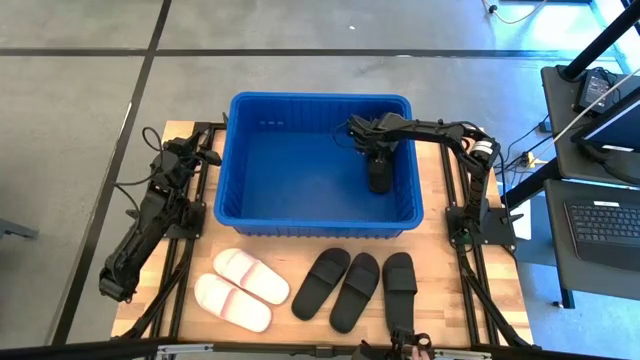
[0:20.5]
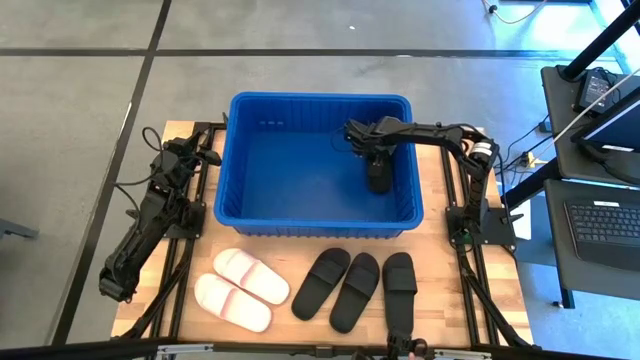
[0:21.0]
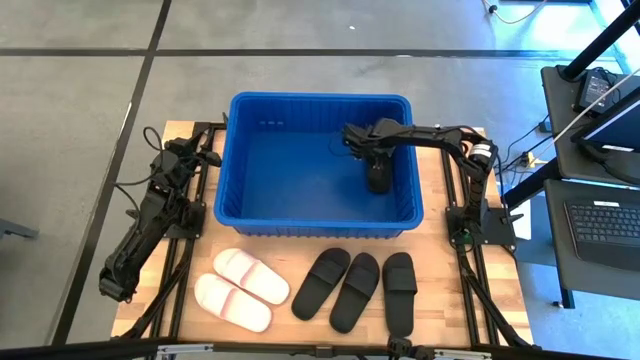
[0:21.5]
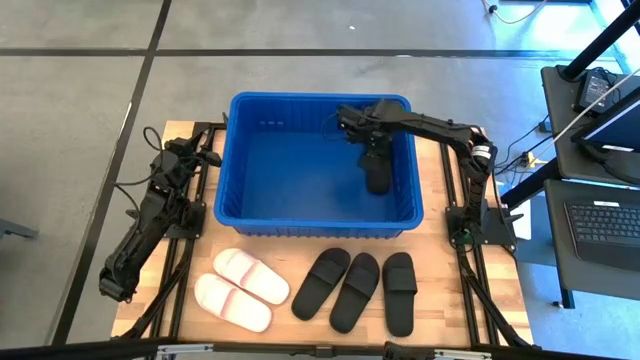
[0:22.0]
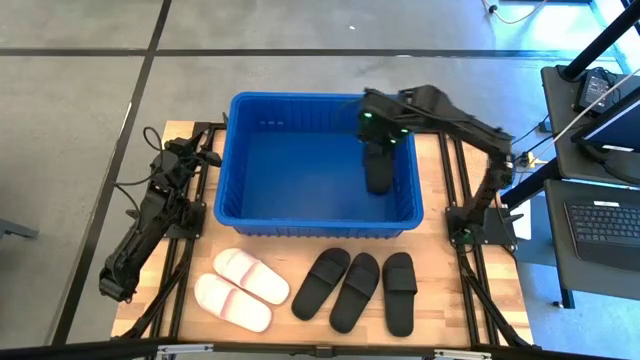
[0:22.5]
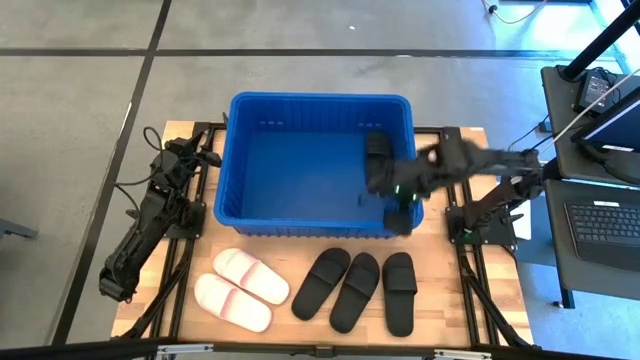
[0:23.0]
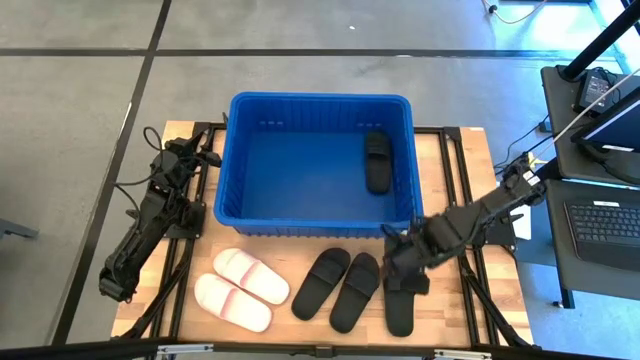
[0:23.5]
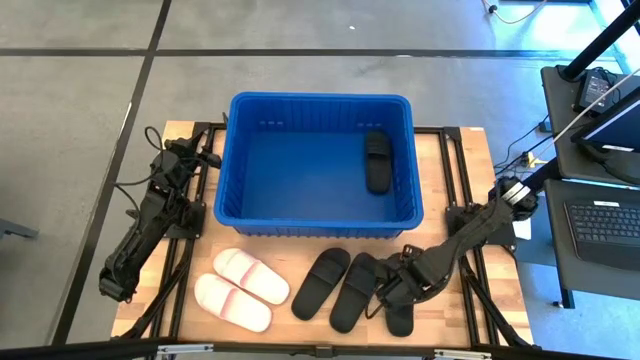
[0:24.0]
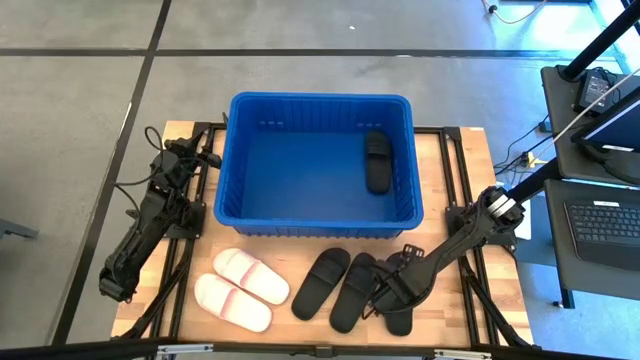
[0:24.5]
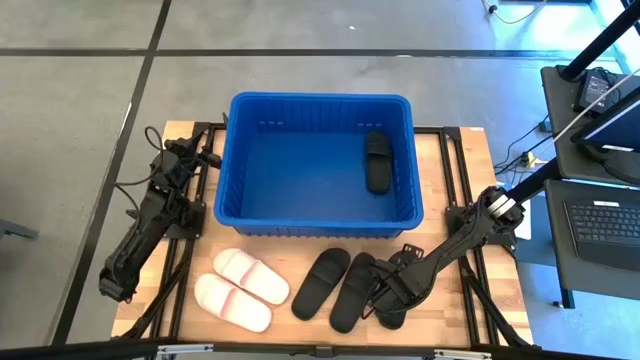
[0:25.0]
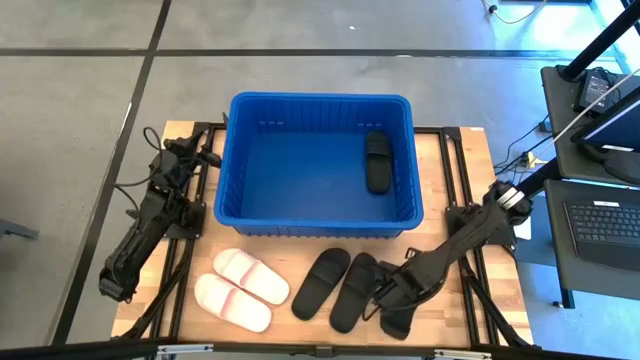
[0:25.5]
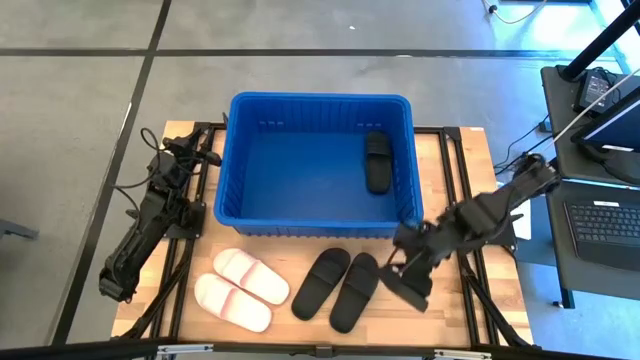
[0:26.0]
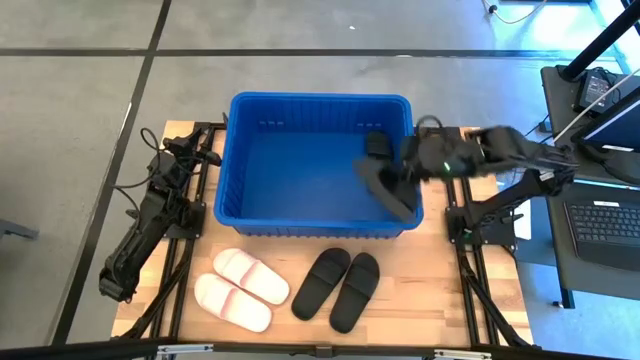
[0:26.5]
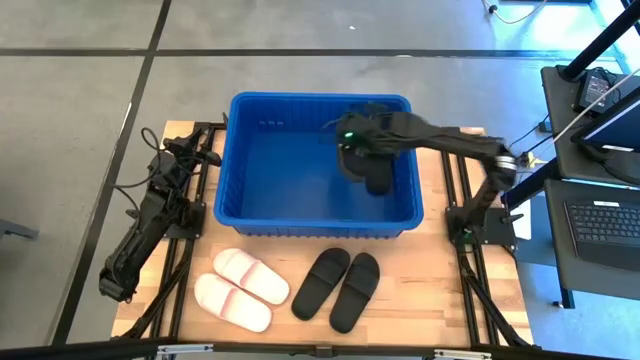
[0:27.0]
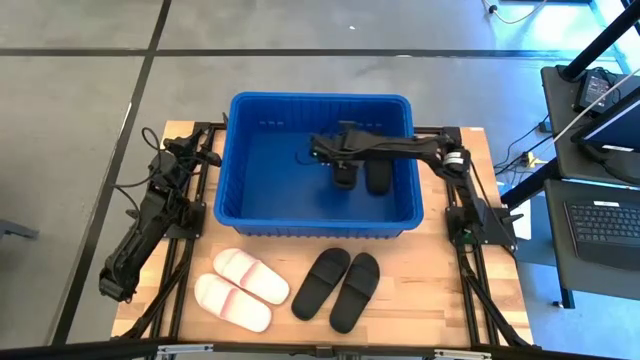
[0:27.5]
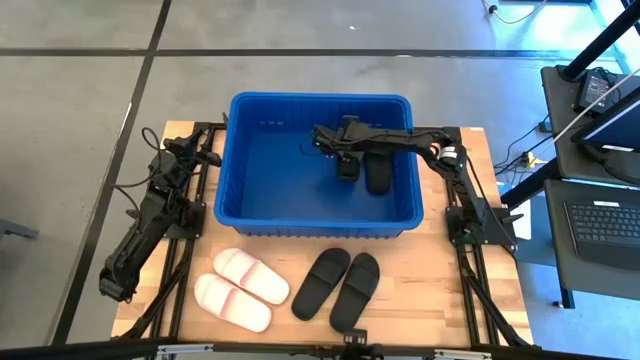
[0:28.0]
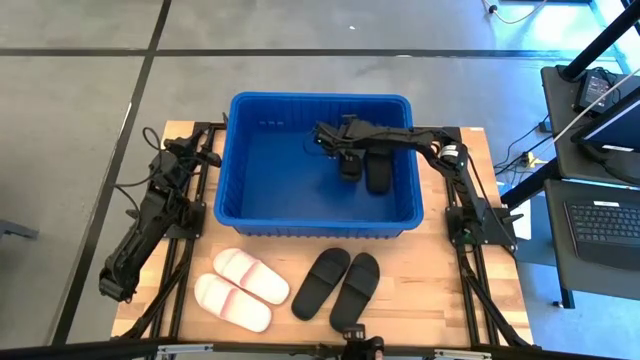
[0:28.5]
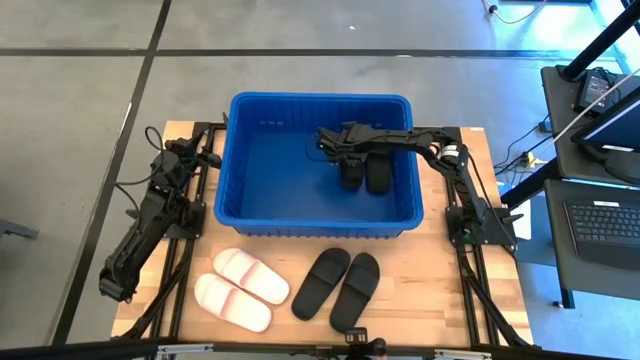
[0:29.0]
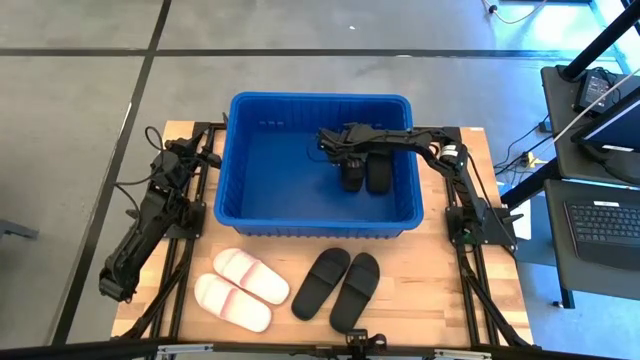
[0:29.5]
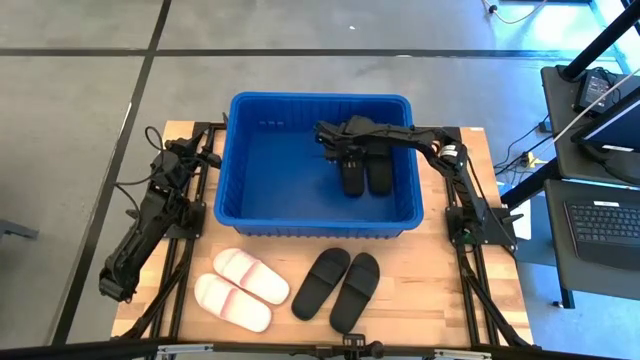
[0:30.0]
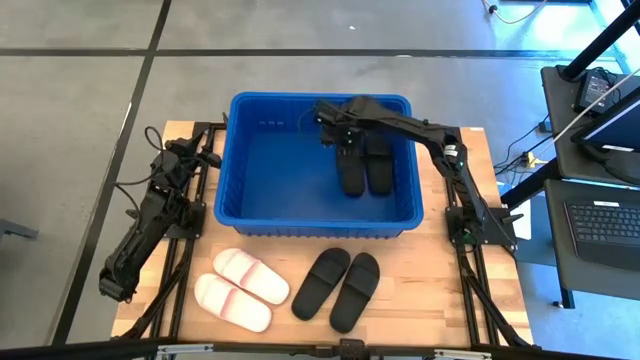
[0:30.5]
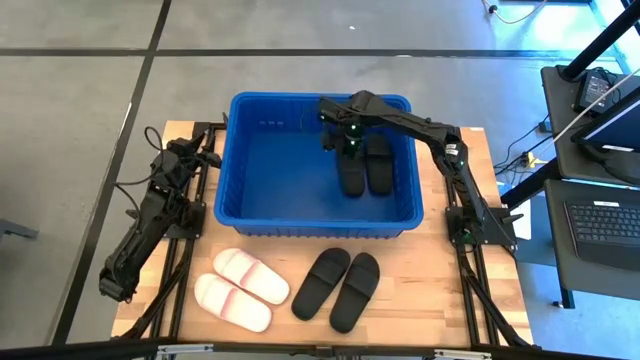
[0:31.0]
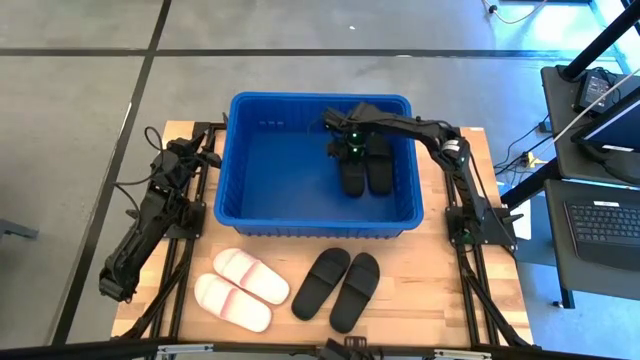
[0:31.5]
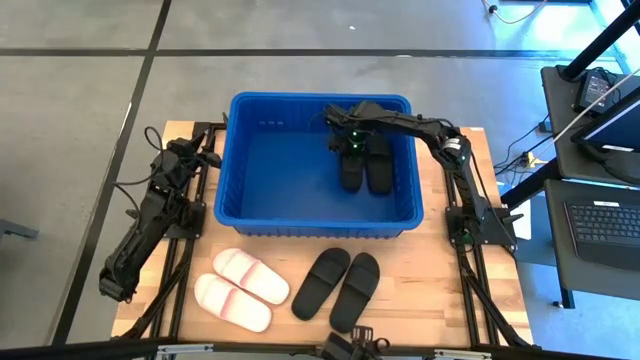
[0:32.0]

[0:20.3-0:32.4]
Task: Pick and place slides into bin
Put the black slide into the organizer bin

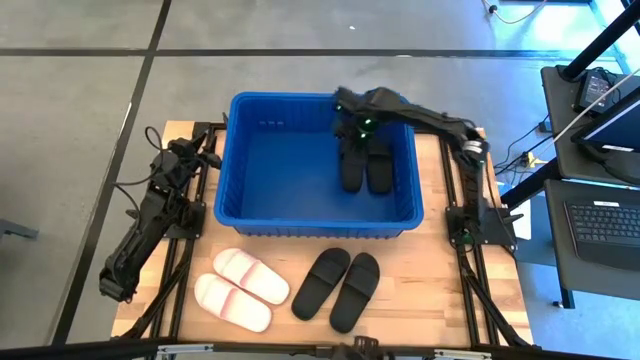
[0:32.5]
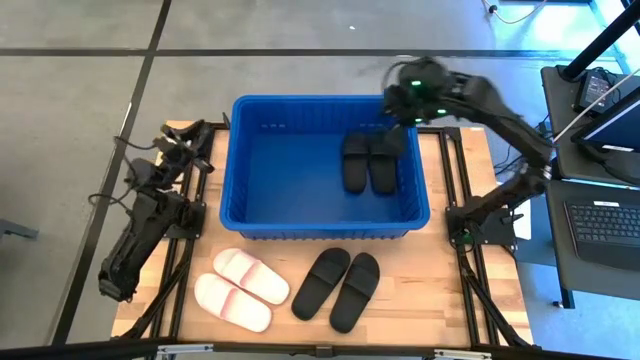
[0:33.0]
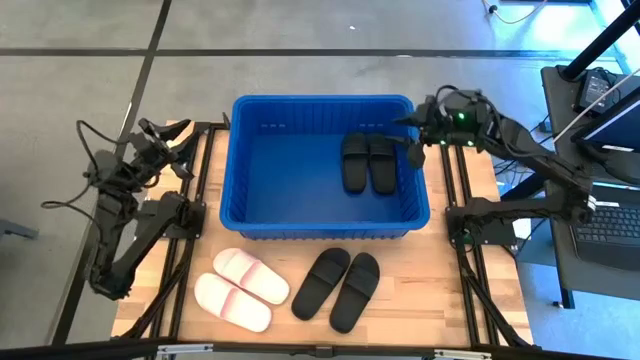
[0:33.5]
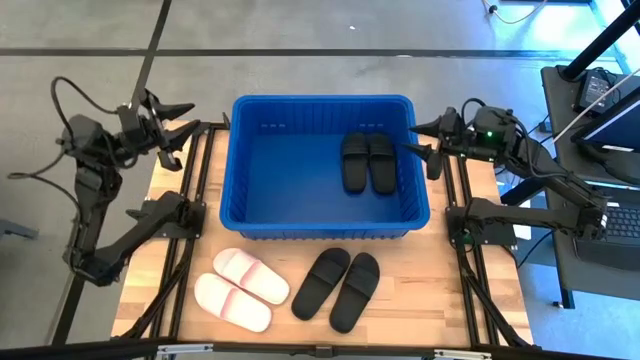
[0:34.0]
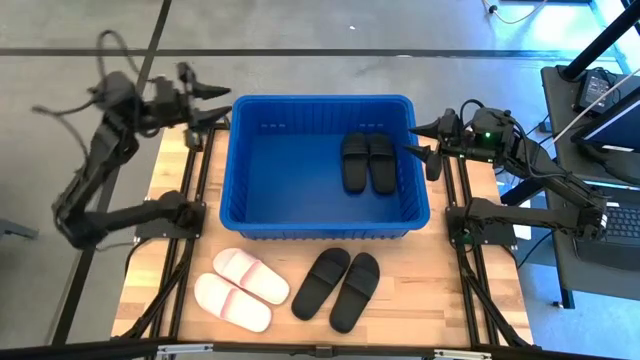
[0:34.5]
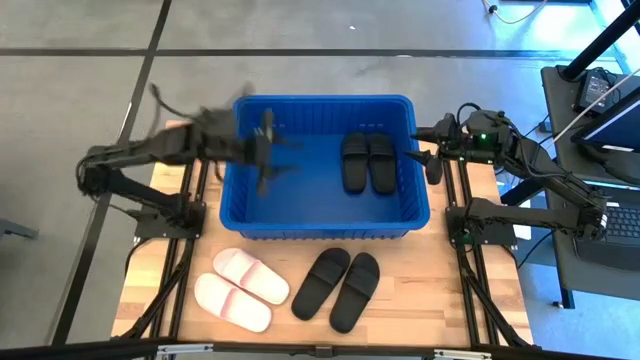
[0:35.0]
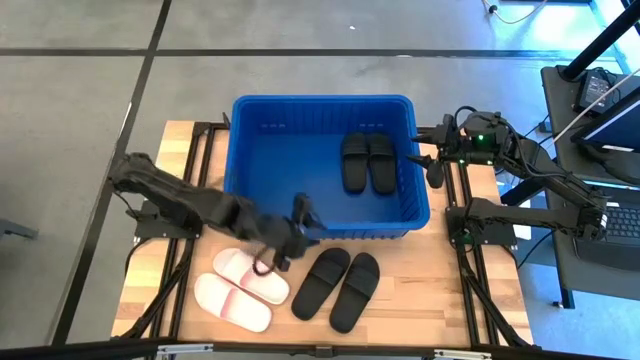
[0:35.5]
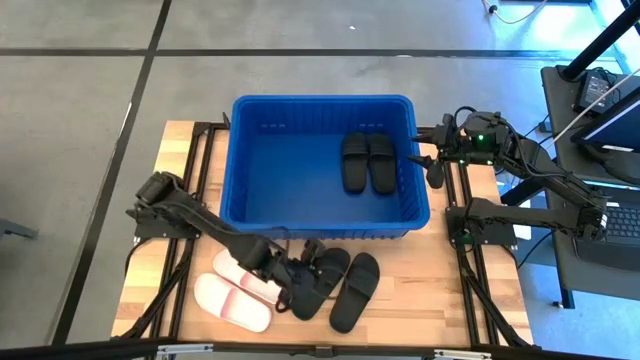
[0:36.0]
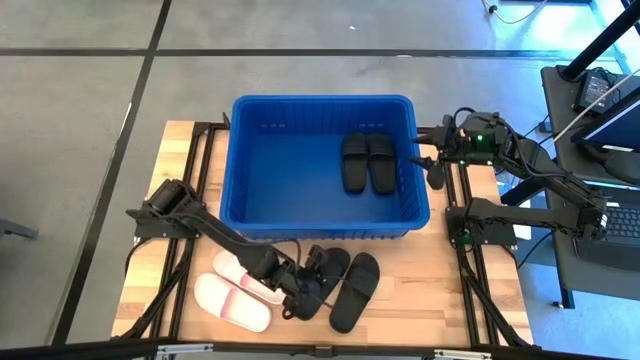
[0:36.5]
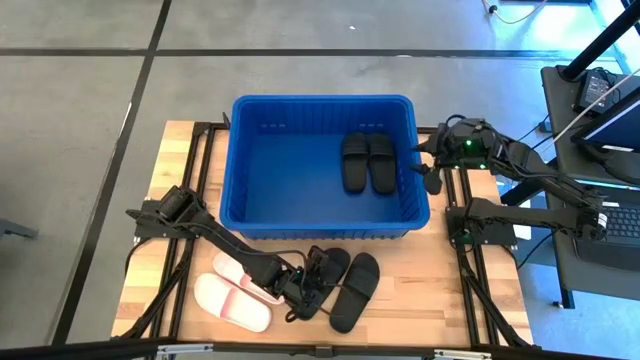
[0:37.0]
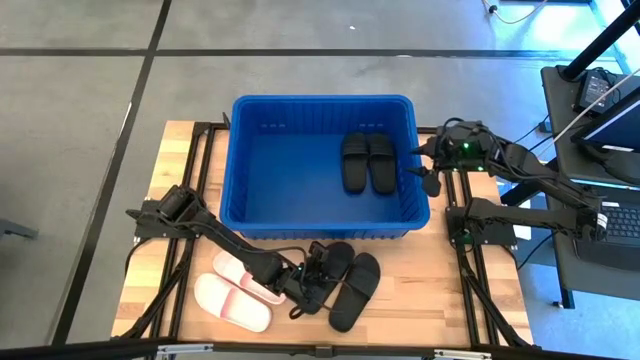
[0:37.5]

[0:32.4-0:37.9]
Put the black slide into the organizer bin

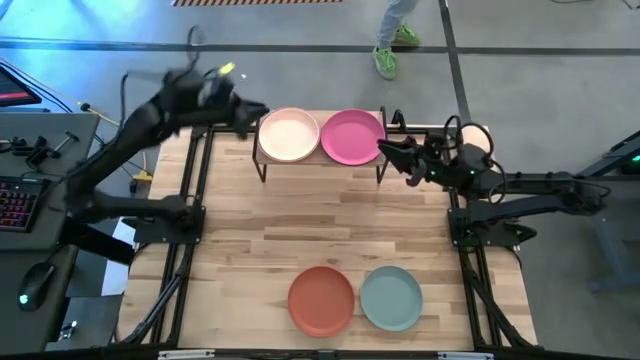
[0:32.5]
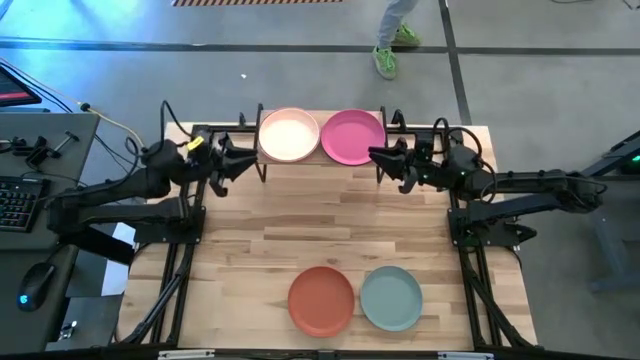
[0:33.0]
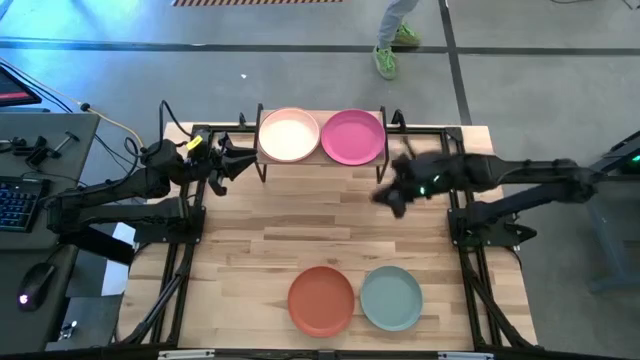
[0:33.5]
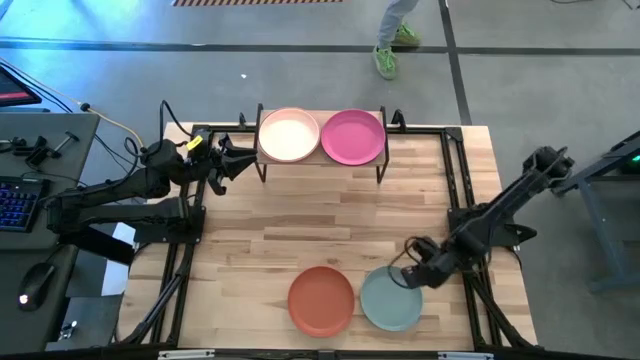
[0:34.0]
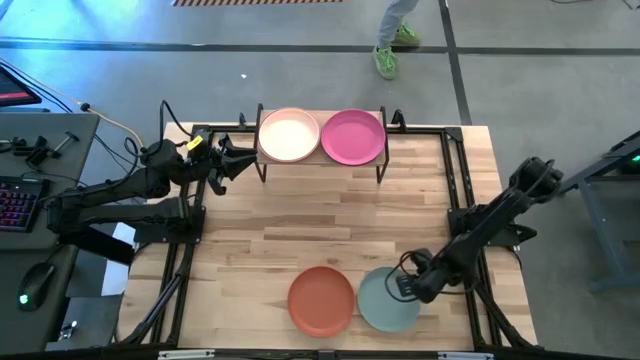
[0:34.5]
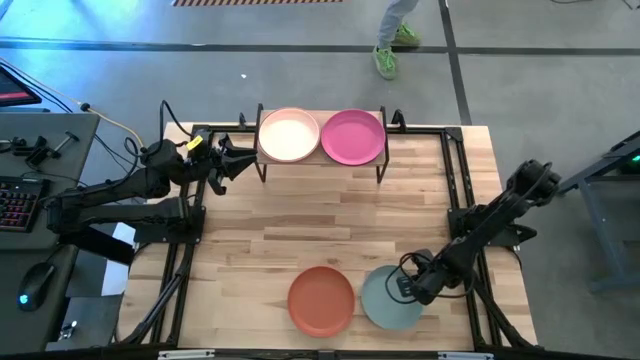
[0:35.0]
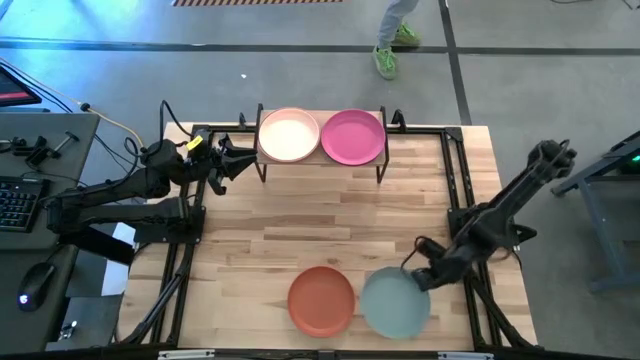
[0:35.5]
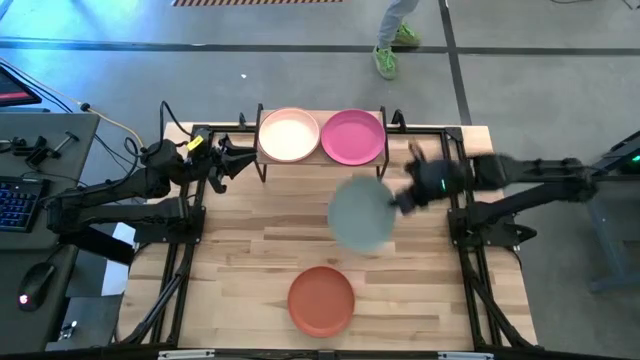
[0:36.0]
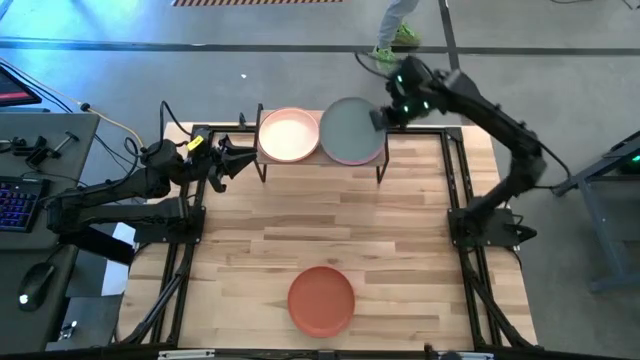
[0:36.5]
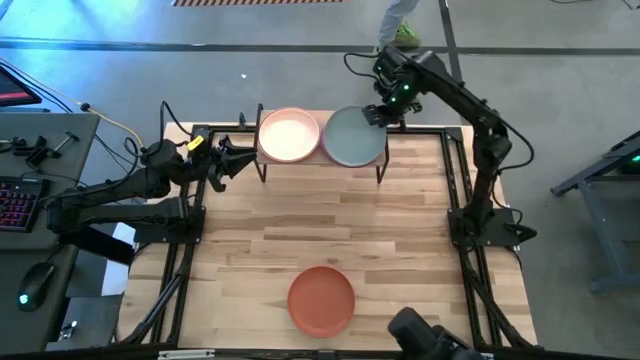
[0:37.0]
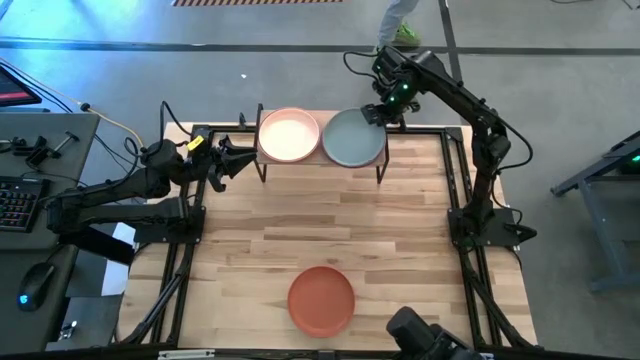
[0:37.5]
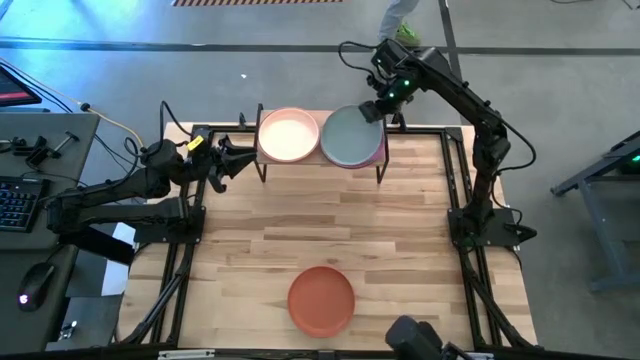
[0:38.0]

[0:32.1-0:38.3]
Task: Place and stack plates onto a shelf
Stack the gray plate on top of the pink plate on the shelf
